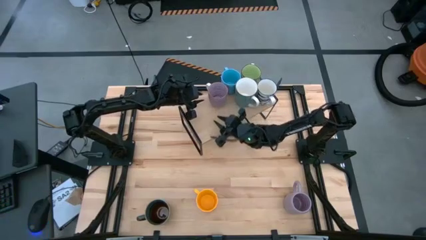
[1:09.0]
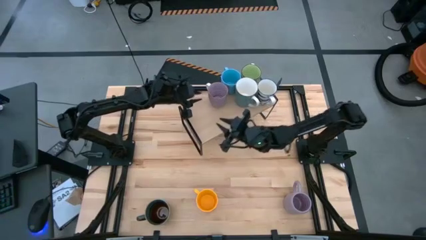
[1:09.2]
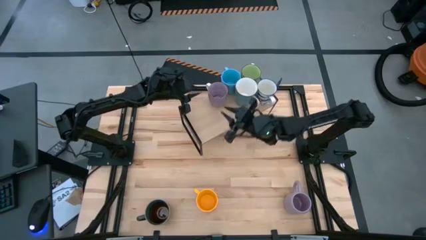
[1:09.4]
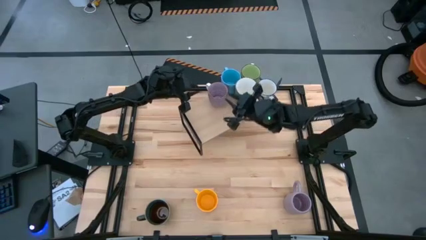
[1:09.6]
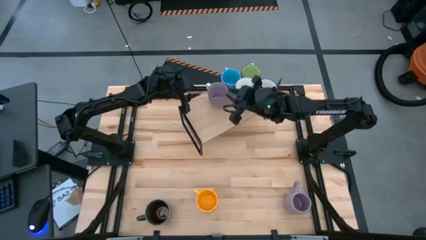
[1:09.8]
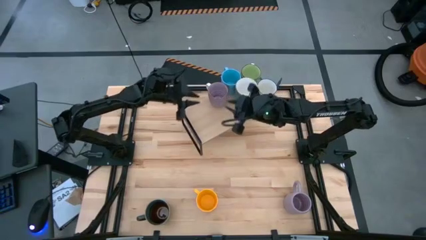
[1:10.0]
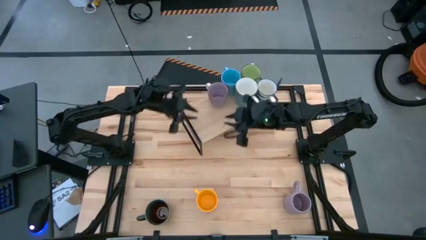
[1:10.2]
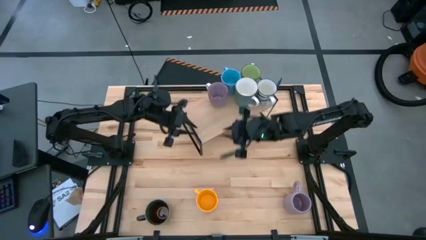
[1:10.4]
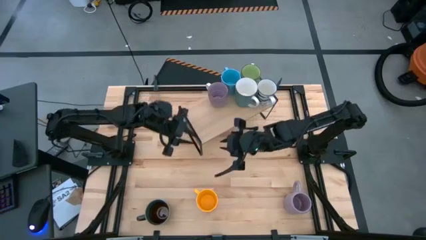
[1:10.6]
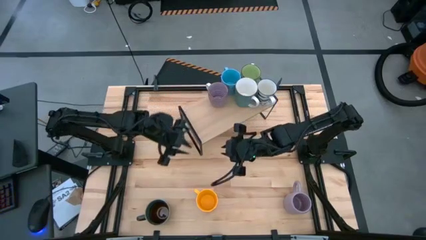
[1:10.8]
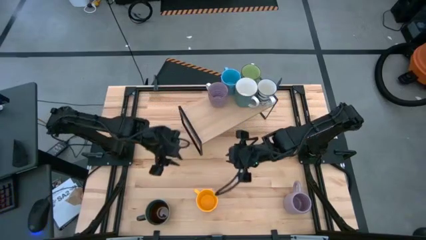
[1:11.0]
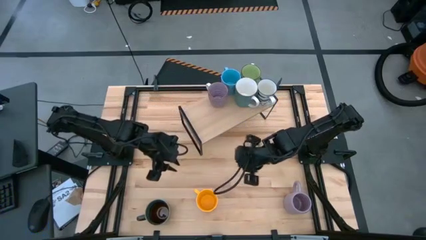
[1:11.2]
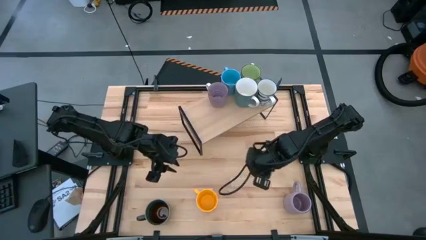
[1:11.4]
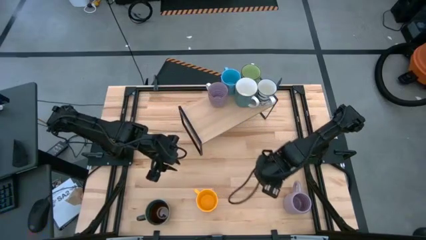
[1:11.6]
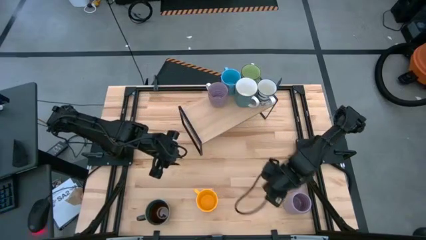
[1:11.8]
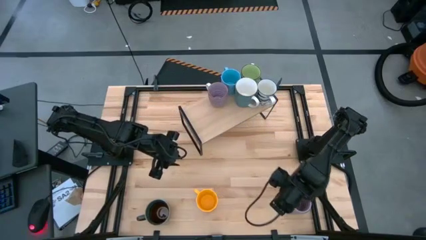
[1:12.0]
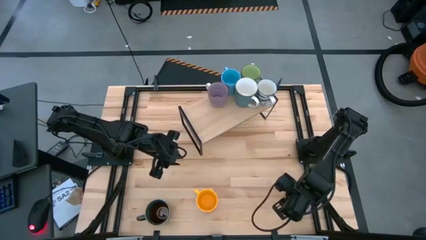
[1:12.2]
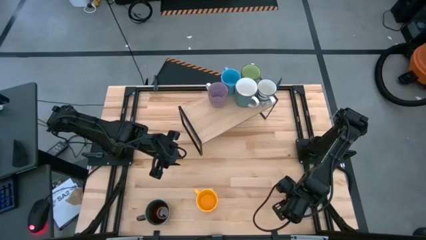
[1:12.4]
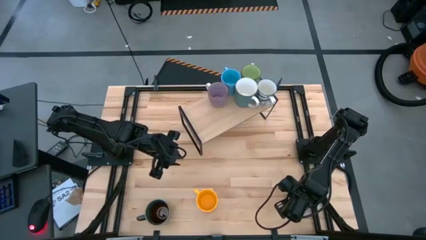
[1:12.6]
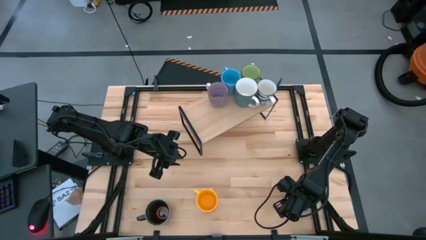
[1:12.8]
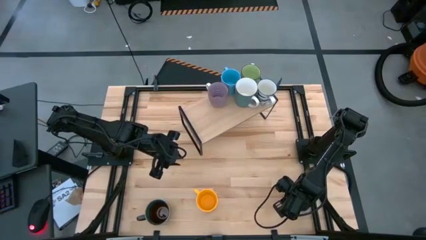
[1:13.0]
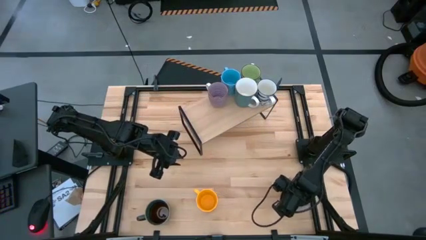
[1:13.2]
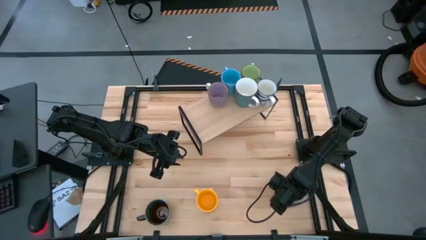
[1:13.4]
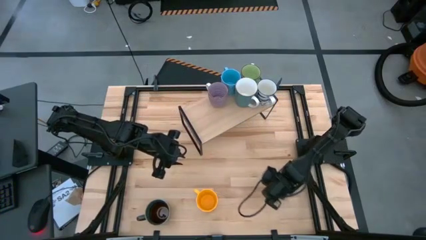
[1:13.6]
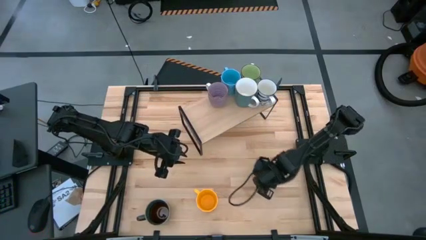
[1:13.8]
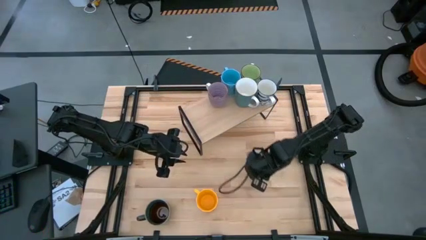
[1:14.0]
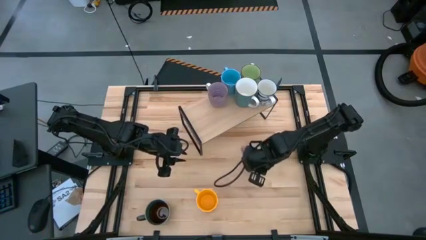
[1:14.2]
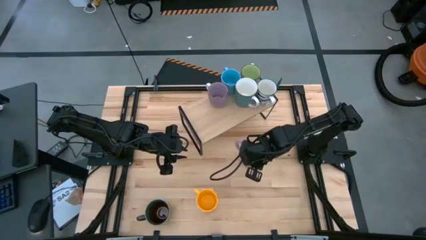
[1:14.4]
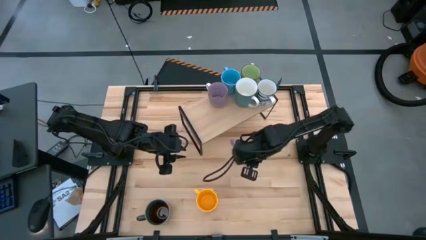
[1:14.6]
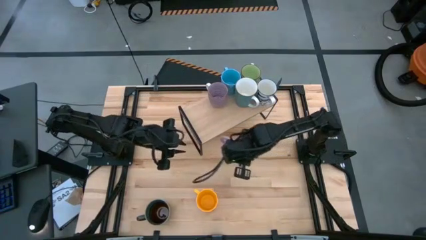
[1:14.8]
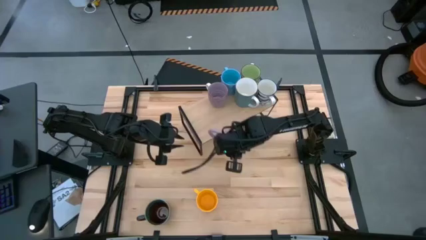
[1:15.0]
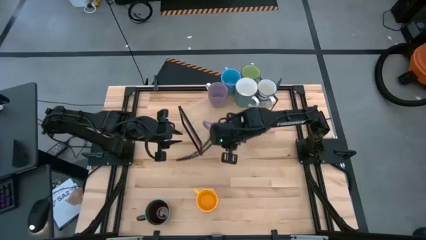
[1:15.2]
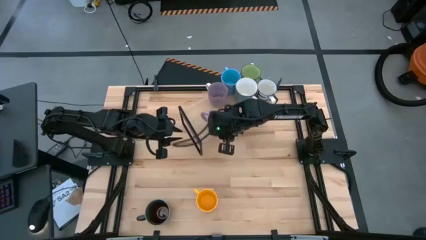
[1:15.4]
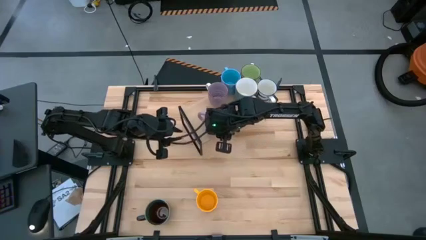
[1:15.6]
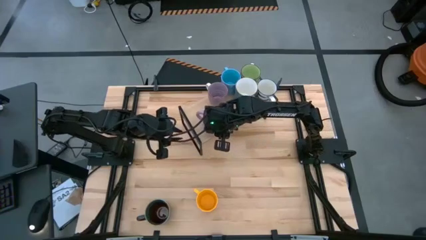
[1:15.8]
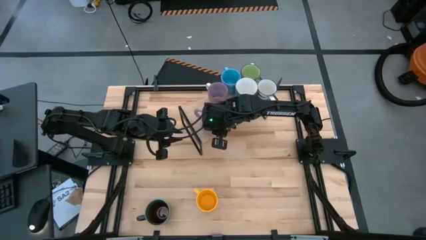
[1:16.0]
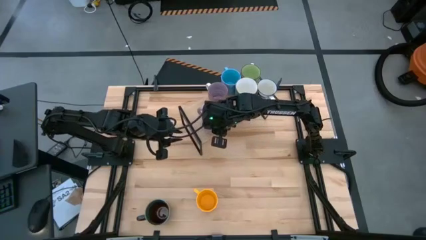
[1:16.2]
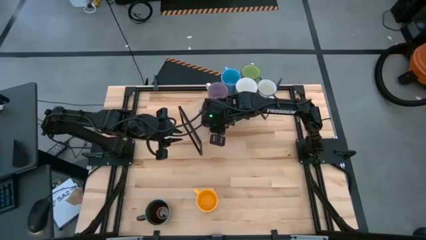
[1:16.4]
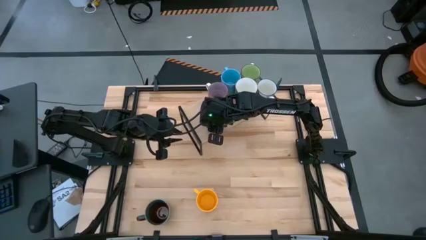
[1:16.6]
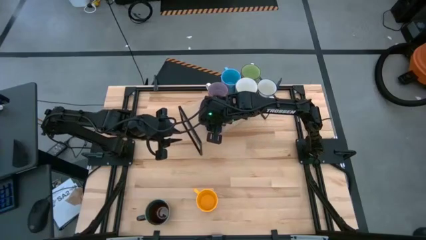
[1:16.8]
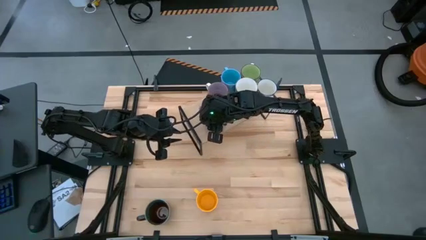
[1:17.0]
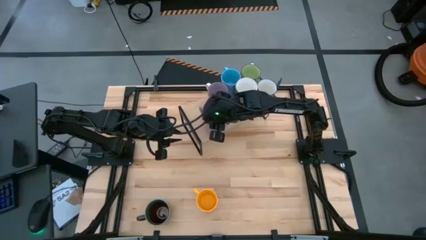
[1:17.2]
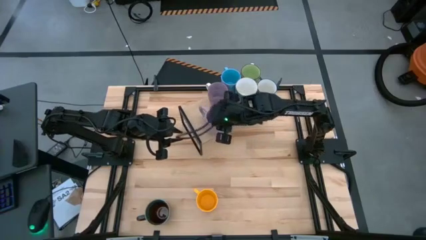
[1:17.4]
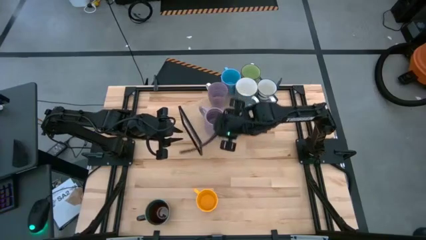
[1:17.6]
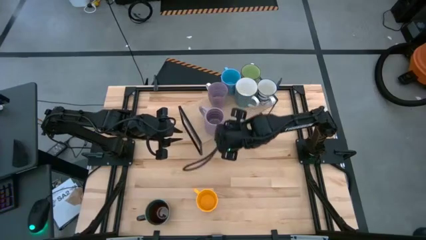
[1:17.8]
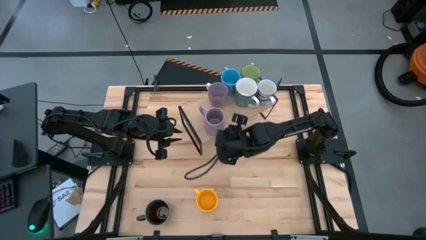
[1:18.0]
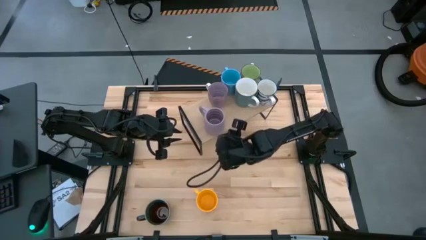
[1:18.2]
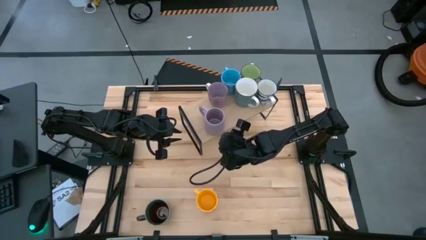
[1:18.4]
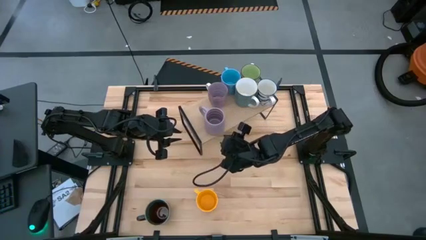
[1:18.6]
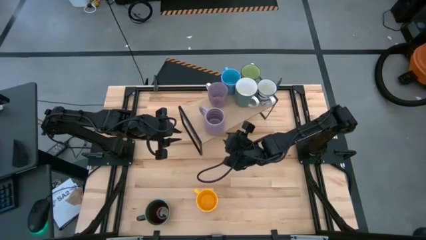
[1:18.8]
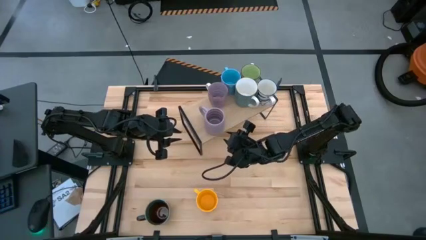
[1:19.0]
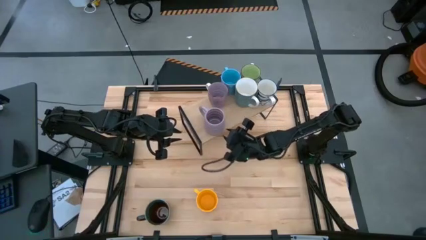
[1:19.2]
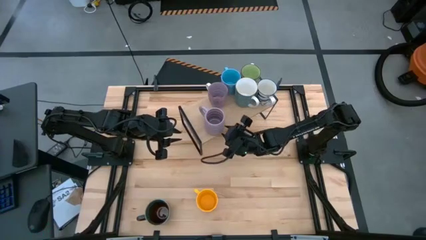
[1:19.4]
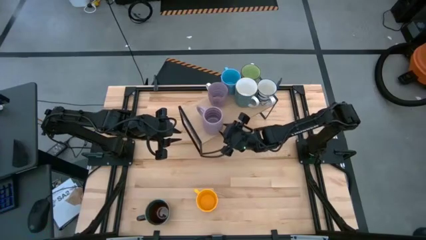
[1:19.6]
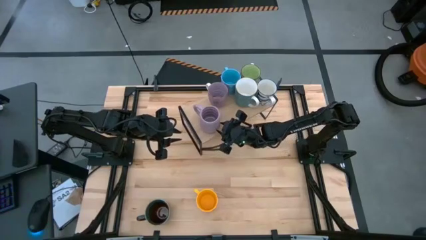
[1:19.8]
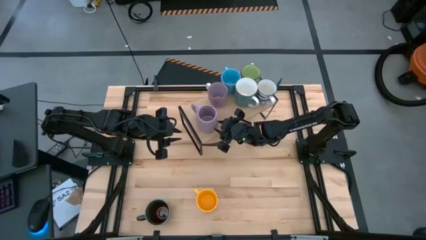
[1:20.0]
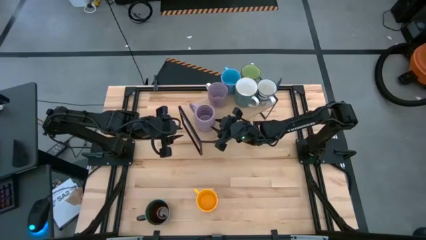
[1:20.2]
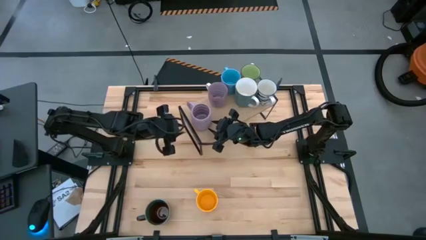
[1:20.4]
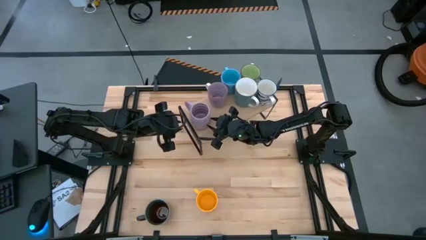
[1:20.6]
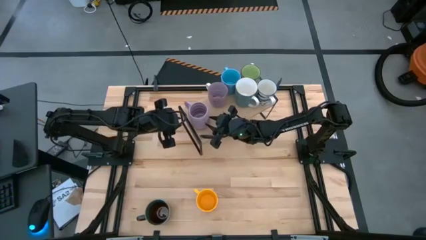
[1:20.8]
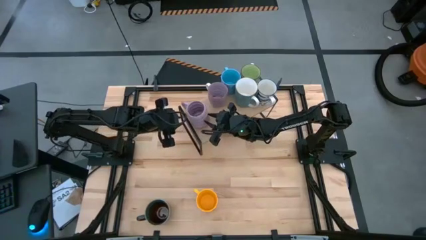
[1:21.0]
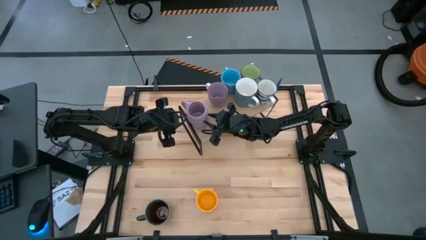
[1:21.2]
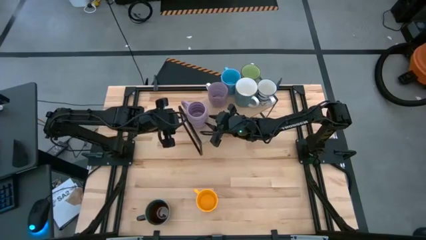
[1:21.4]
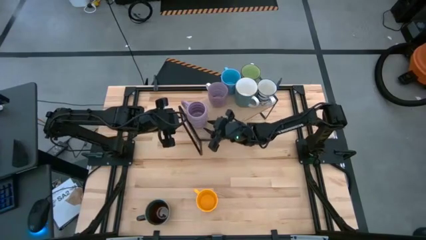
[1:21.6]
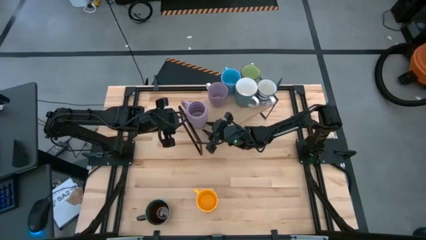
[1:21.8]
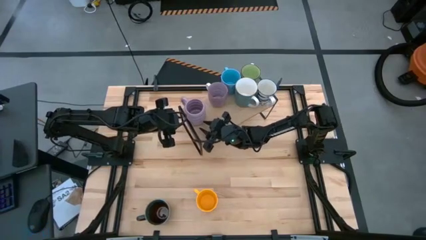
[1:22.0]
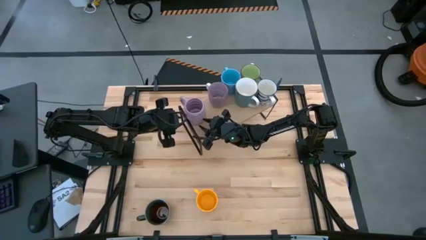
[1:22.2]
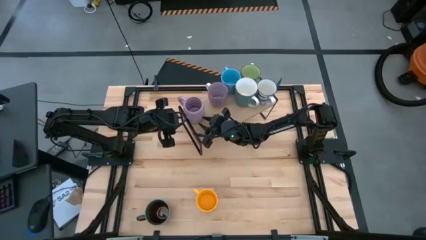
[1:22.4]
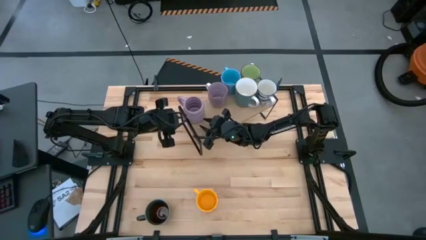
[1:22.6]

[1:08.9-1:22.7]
Task: Place coffee mugs
Put the purple mug on the shelf

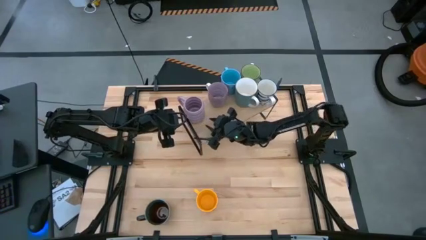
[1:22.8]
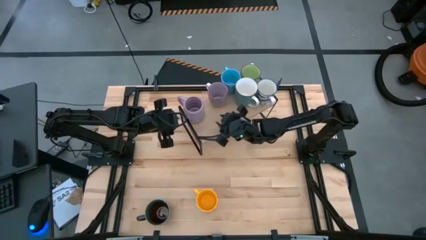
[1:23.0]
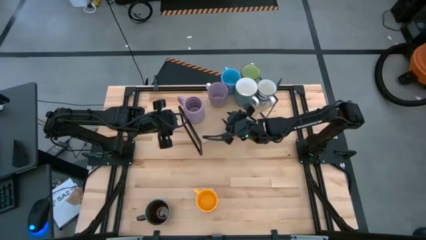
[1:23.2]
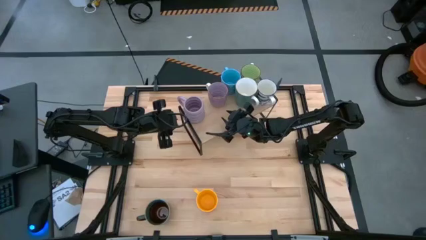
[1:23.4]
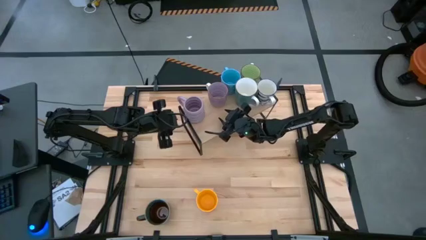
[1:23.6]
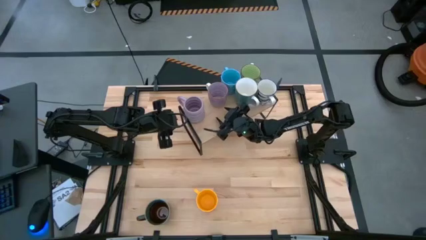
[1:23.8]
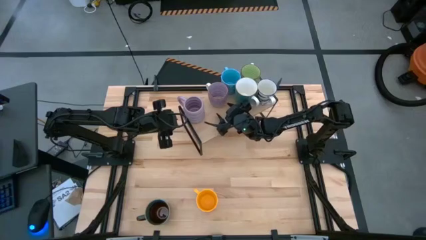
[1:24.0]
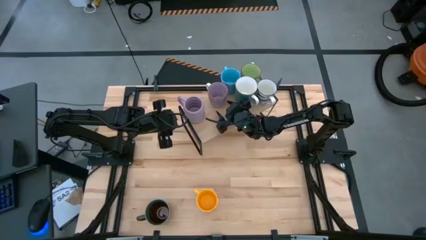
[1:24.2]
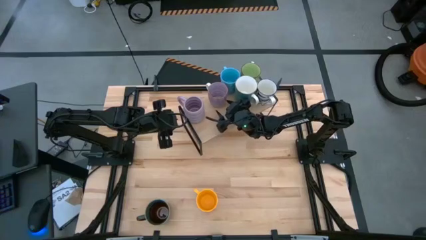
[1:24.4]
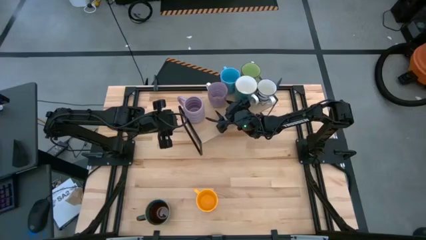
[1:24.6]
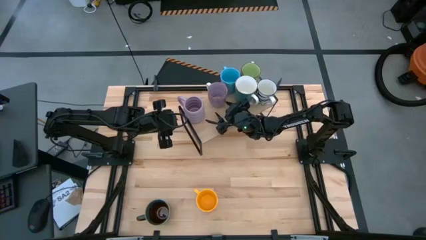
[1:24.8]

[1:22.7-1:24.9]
Adjust the purple mug on the shelf

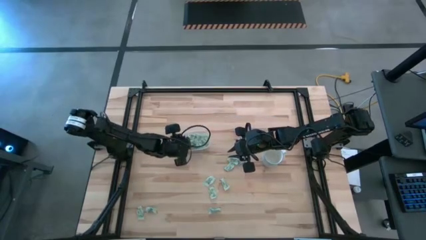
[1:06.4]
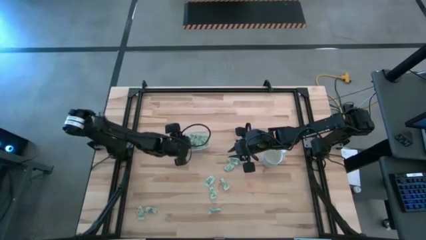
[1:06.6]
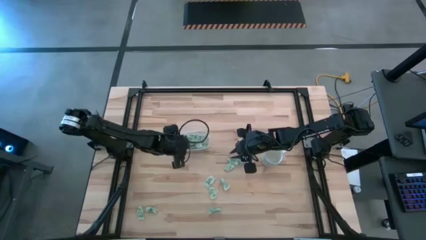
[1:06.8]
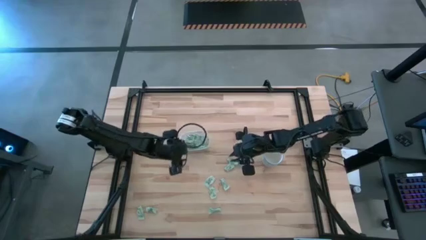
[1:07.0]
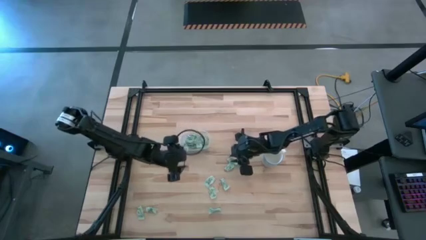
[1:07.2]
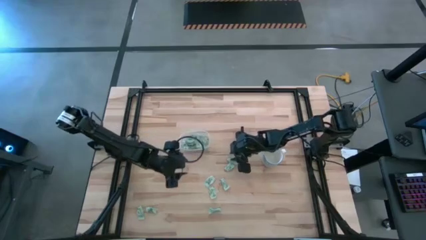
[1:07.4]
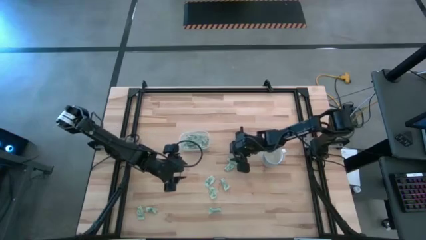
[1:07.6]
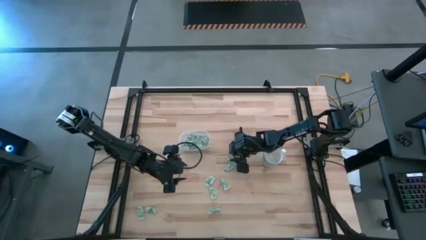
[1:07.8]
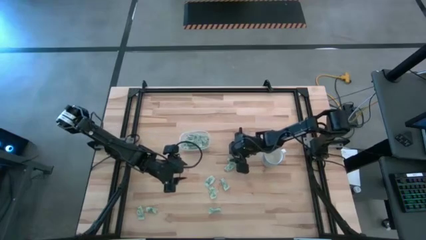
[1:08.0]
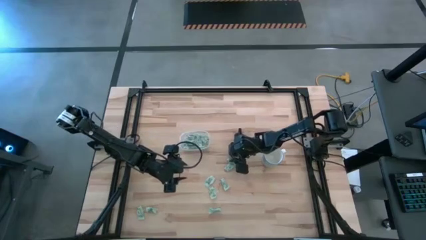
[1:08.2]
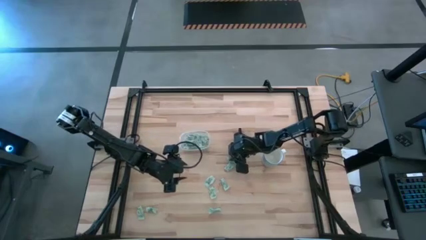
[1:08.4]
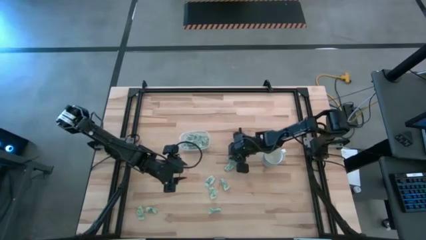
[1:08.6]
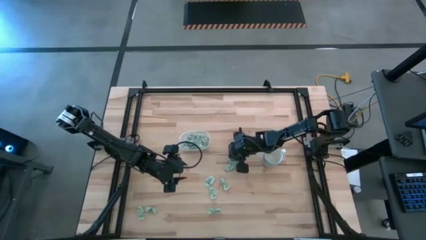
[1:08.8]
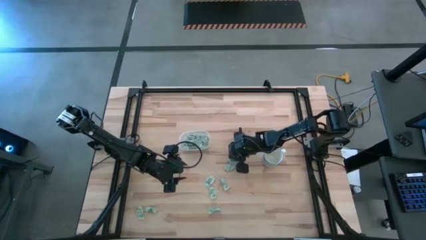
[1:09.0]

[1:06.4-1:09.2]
Task: Pick and place Stevia / Truvia into bins
Put the stevia packet into the transparent bin
